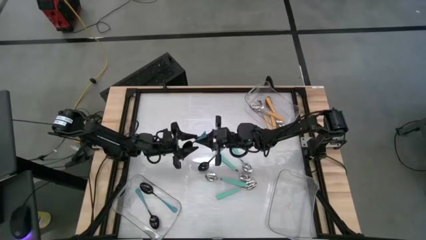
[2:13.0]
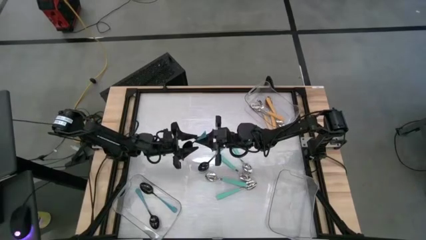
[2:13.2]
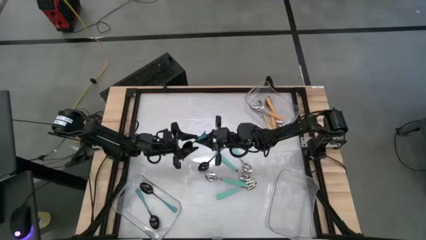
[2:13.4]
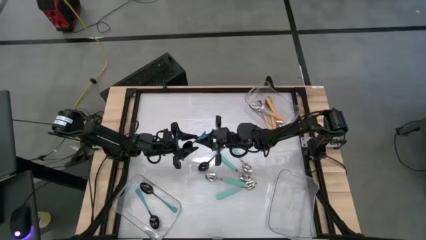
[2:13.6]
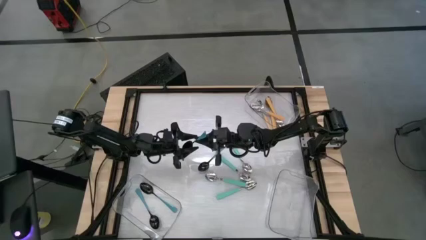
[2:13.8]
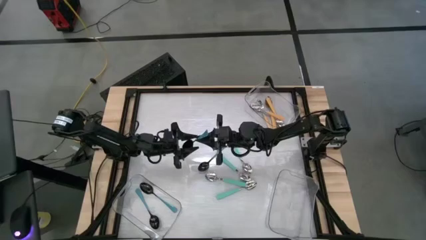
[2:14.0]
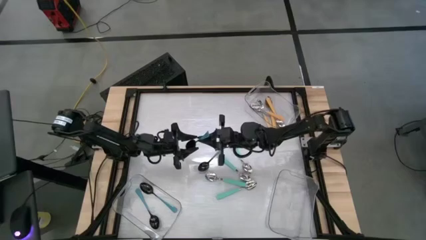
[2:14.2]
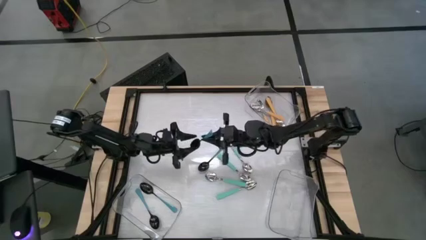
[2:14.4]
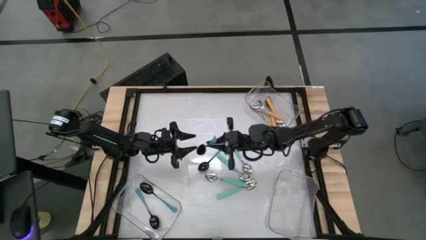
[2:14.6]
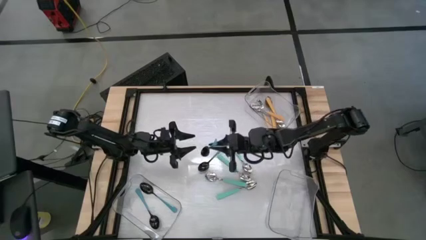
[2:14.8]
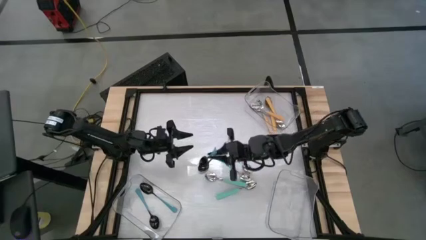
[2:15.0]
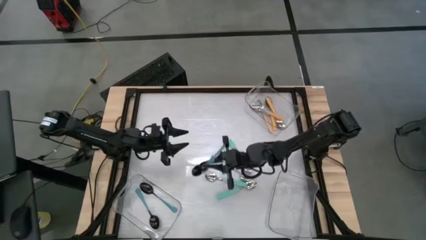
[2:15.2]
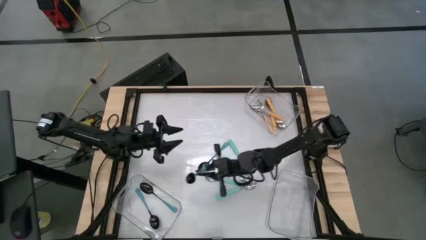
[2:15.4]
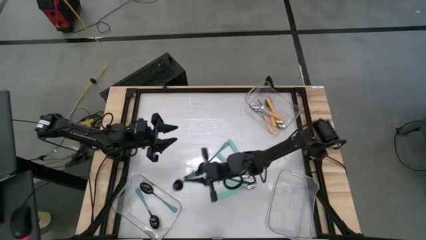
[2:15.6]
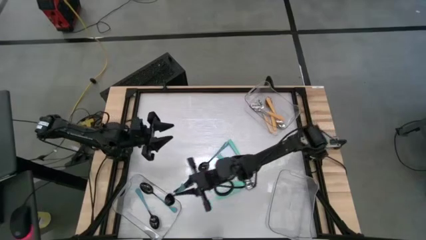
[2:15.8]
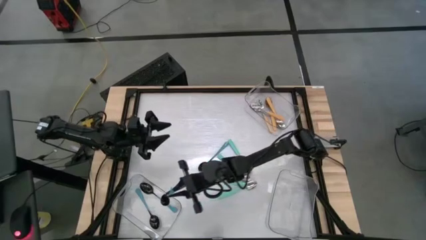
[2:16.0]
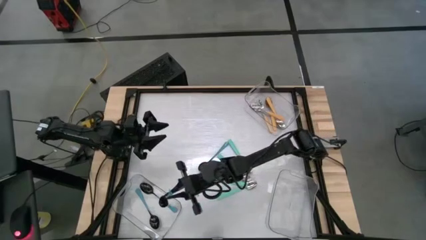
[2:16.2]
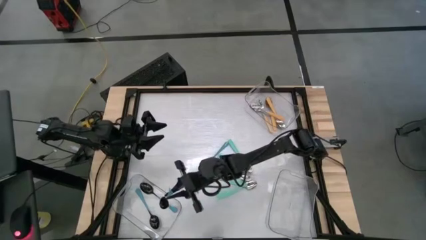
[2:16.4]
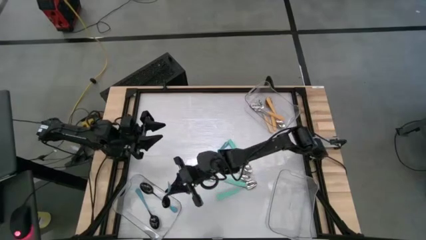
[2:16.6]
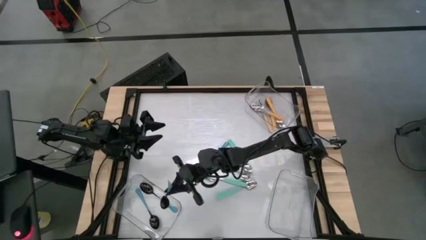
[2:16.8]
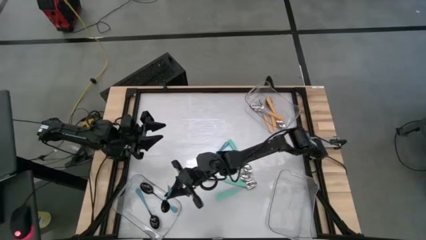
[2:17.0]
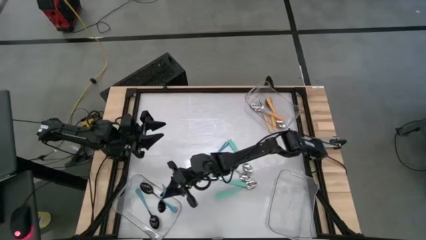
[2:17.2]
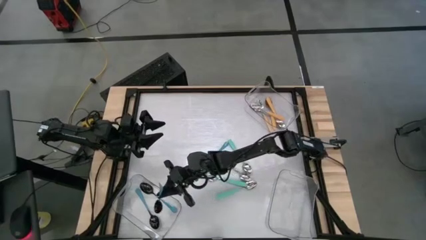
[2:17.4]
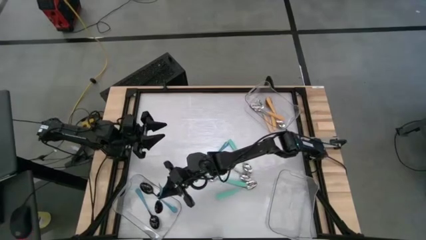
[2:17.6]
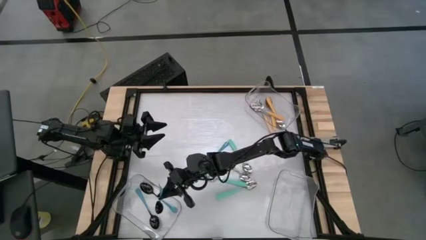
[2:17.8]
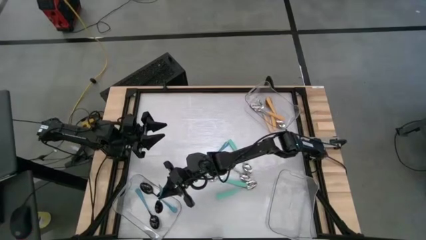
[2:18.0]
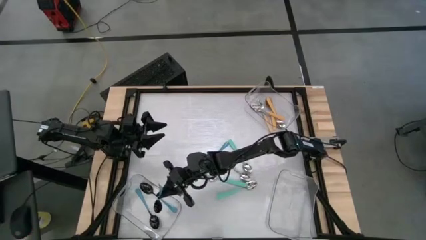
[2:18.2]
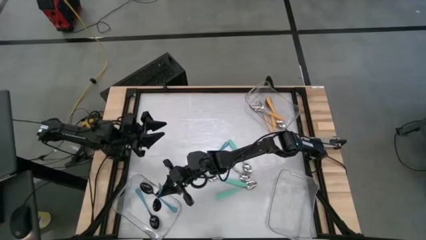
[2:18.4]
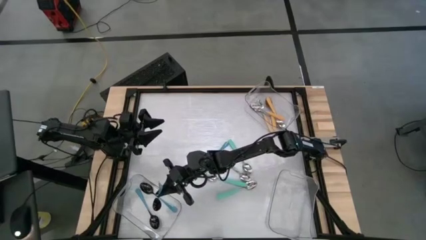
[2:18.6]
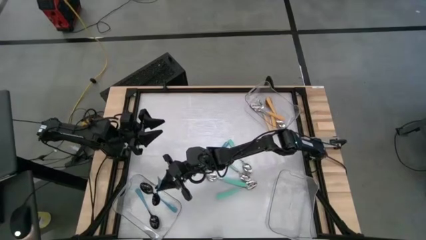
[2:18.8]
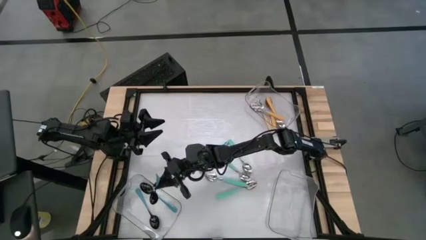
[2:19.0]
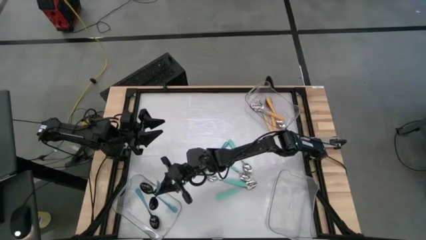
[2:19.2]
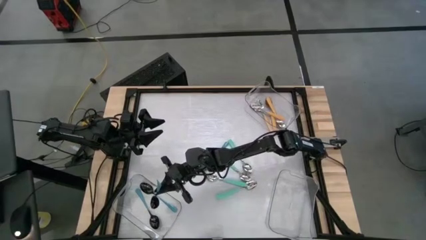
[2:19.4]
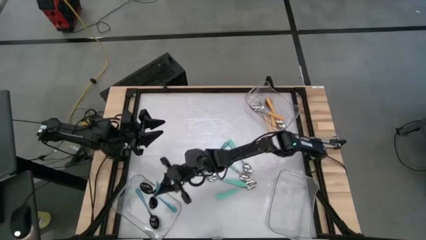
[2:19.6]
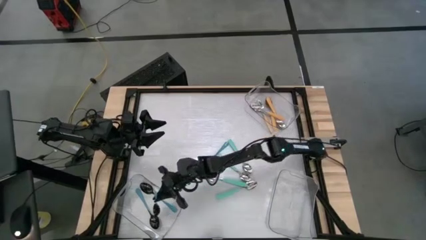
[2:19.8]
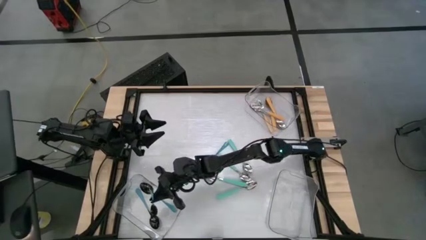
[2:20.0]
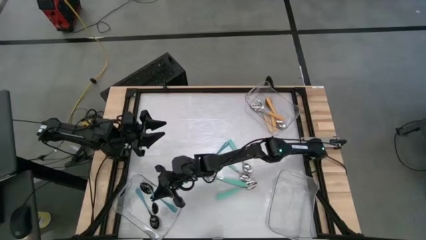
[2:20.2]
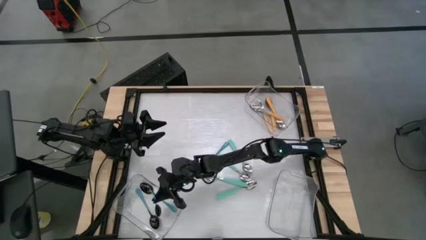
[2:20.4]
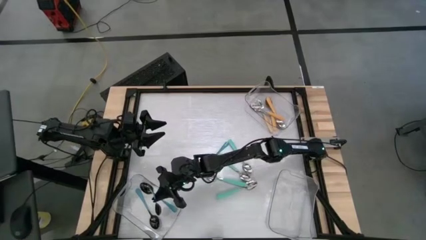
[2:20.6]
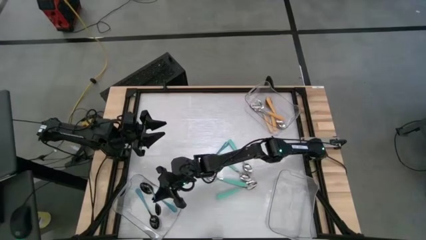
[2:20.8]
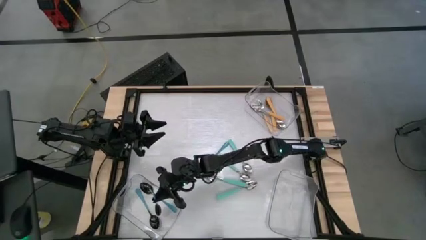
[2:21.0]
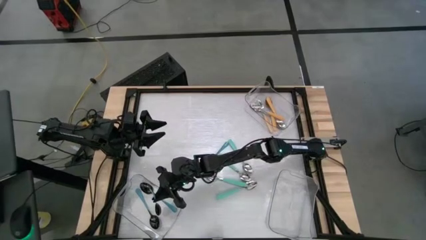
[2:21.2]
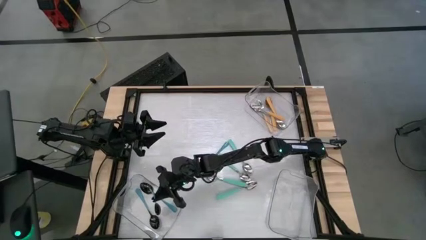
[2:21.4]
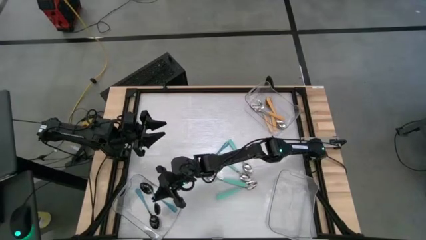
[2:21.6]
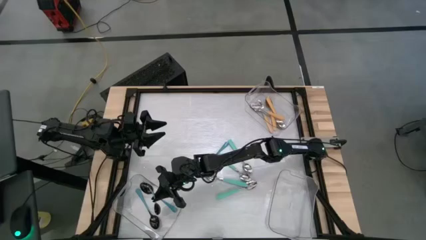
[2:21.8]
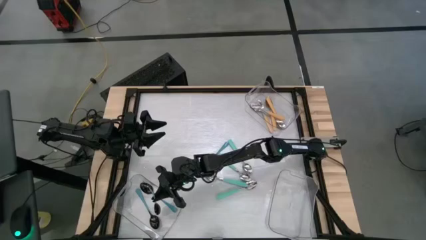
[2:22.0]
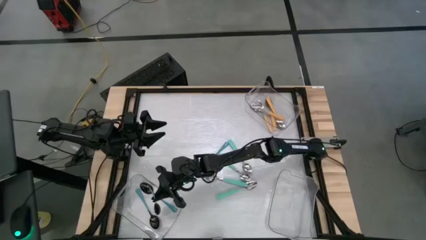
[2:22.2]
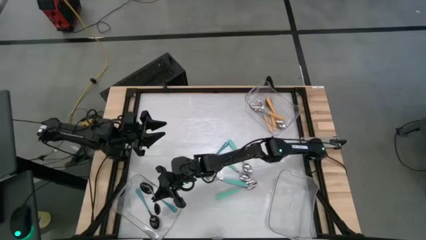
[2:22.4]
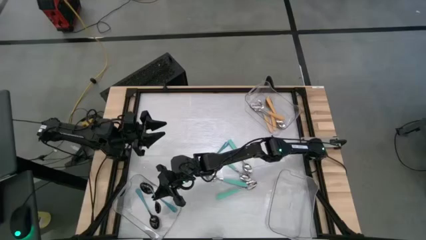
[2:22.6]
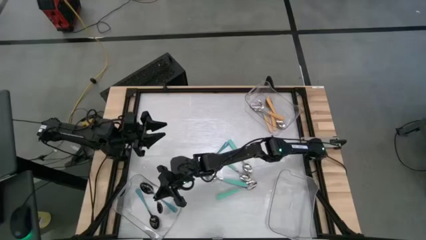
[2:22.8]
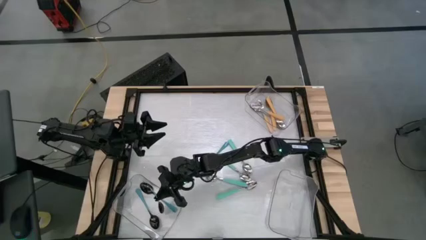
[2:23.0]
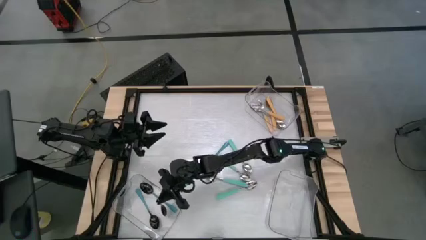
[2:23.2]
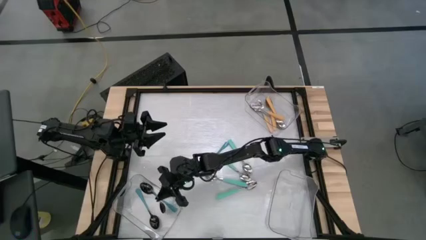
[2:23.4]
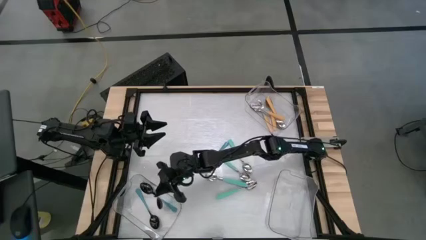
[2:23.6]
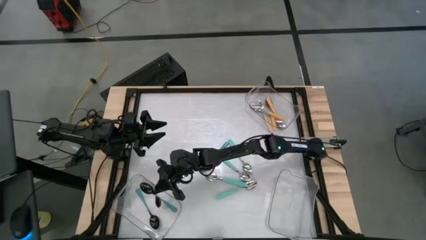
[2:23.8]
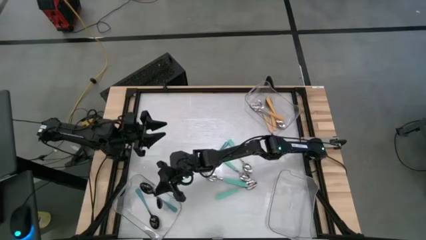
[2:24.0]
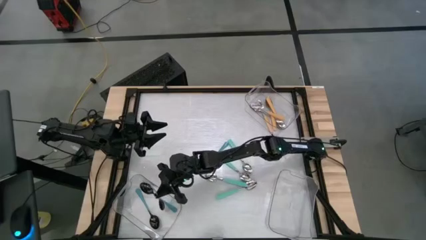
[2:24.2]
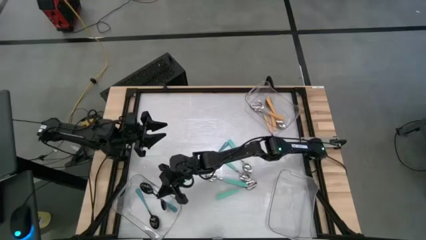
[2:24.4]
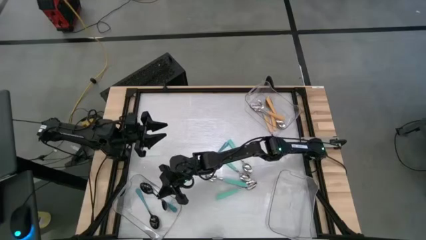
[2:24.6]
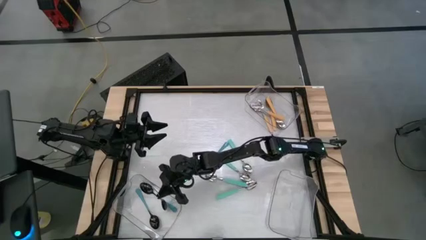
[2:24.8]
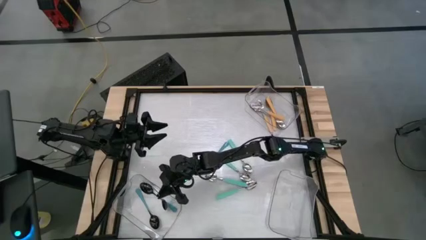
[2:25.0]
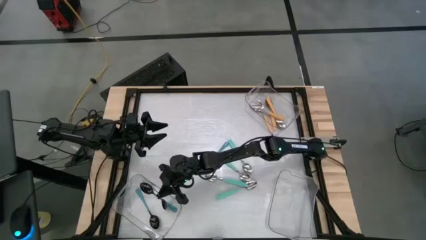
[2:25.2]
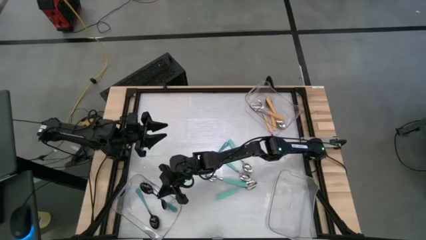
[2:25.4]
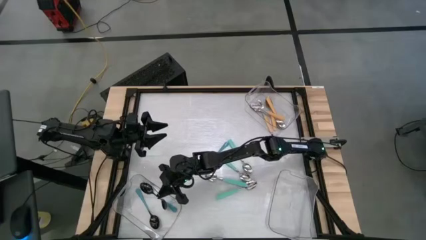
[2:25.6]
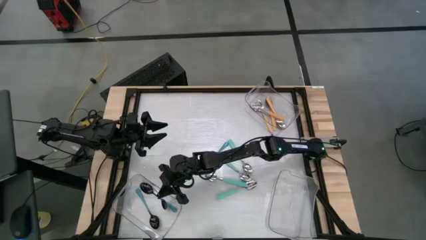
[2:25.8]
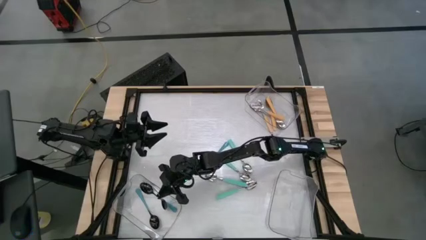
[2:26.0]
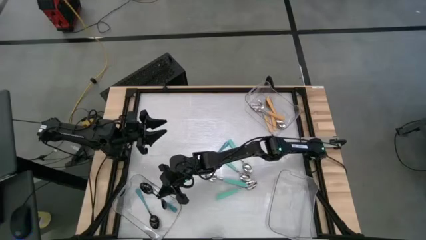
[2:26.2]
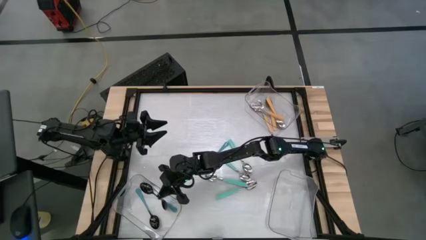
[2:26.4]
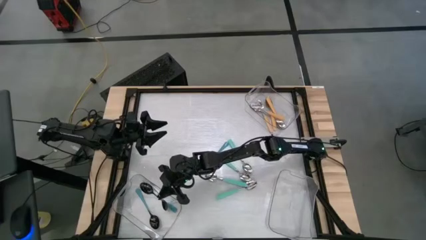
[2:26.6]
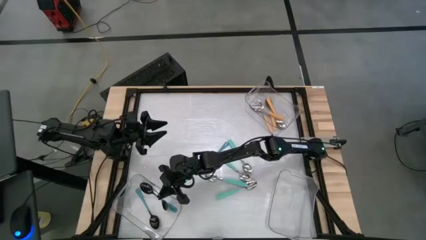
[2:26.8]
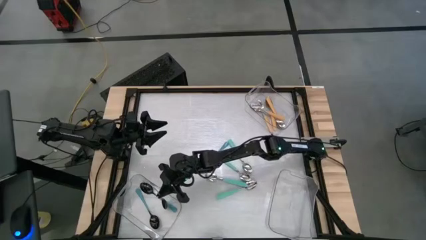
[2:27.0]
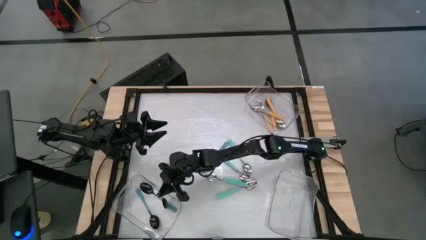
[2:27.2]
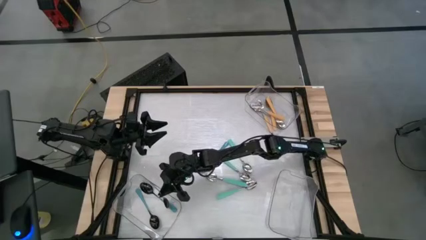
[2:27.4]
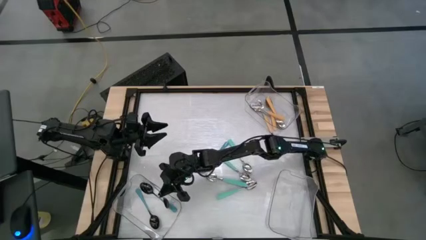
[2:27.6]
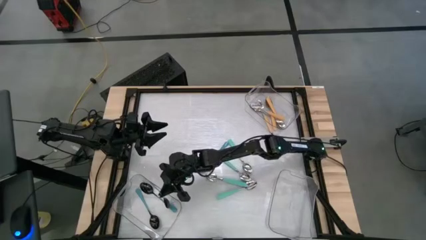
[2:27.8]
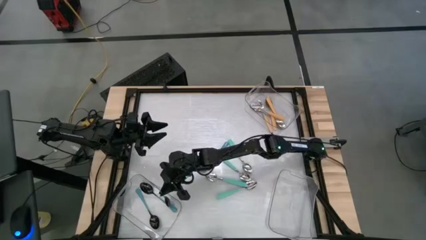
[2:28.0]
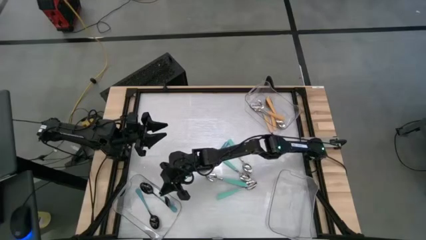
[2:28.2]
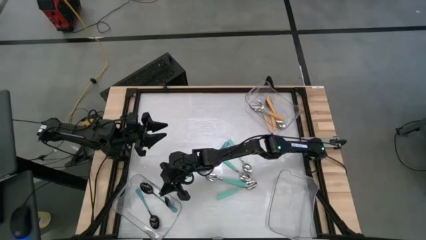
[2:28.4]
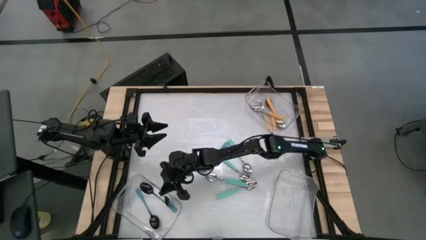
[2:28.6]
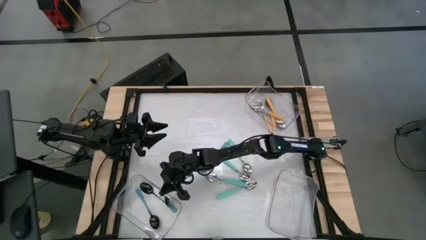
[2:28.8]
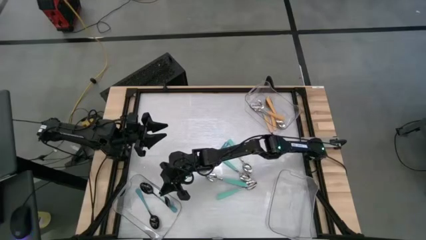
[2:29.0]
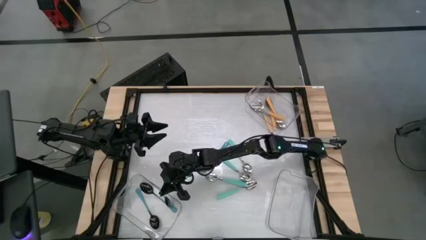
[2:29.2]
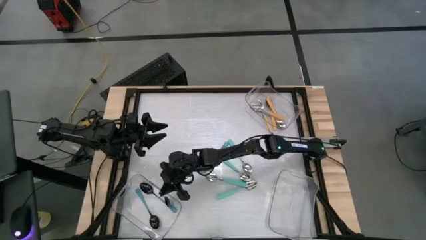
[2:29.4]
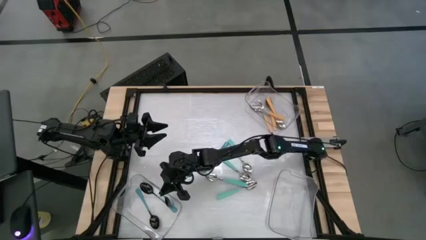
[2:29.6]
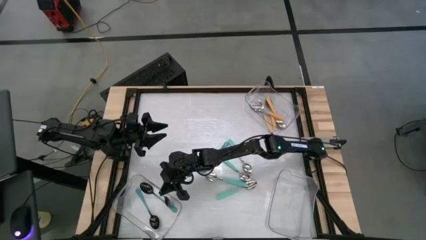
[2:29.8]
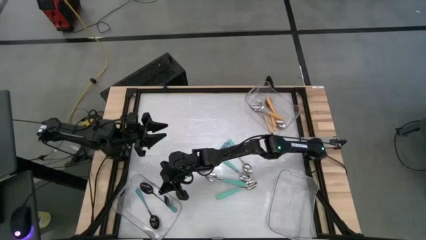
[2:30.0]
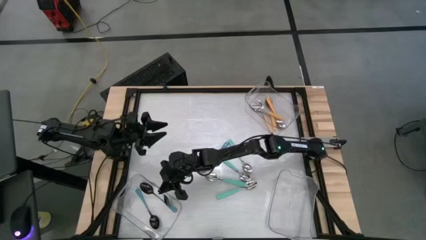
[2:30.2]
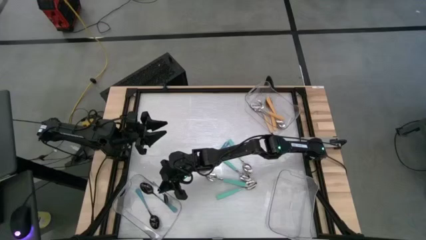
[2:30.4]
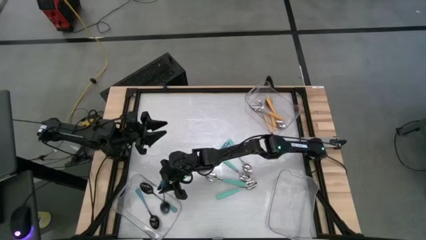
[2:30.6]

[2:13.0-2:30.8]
Task: Sort silverware by color (type)
Put the blue spoon into the bottom left transparent bin
